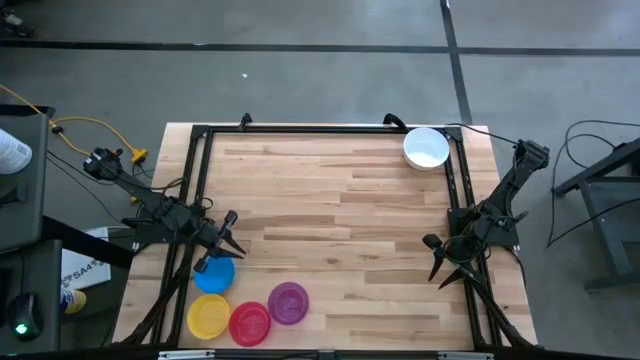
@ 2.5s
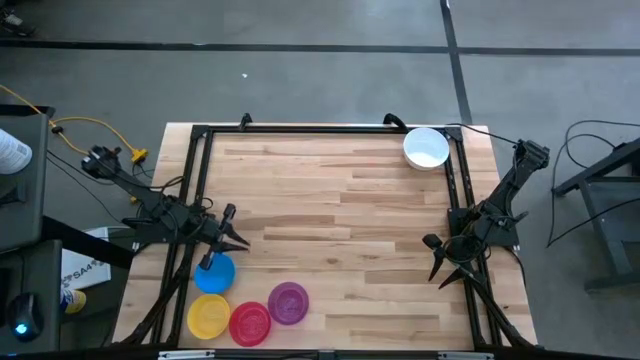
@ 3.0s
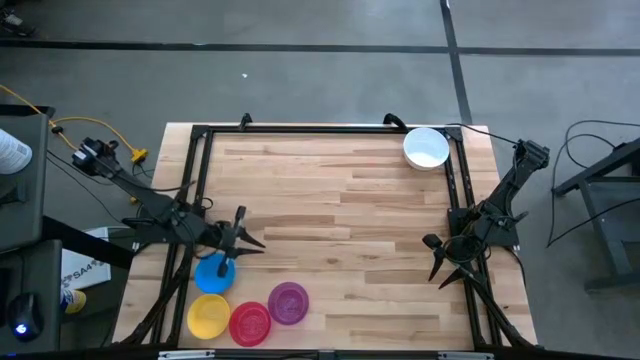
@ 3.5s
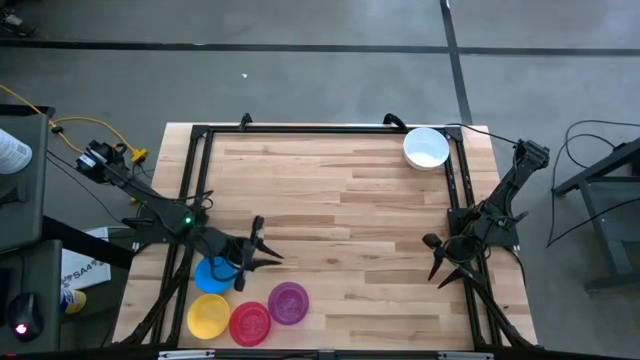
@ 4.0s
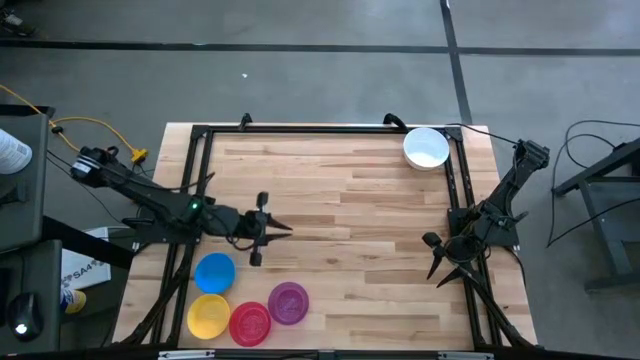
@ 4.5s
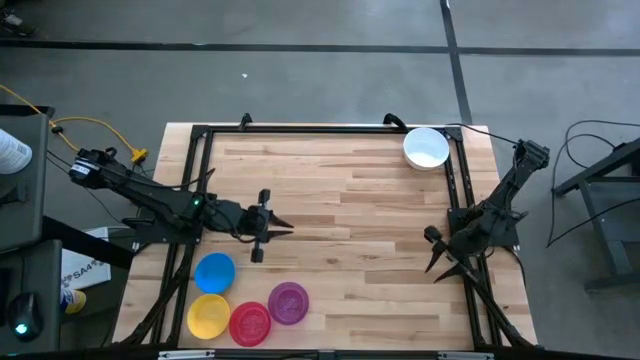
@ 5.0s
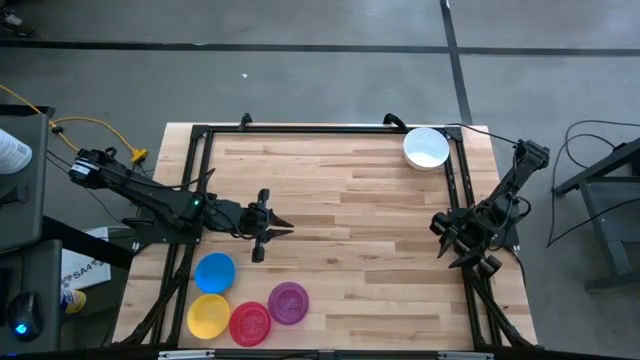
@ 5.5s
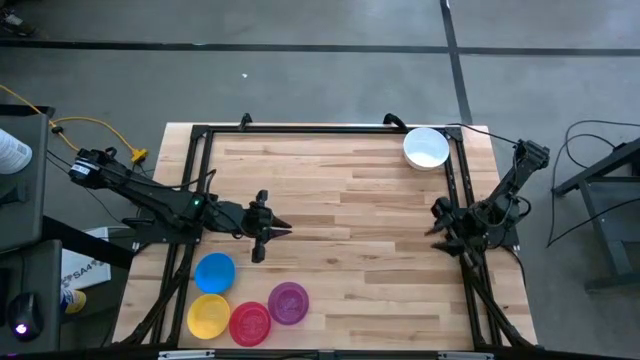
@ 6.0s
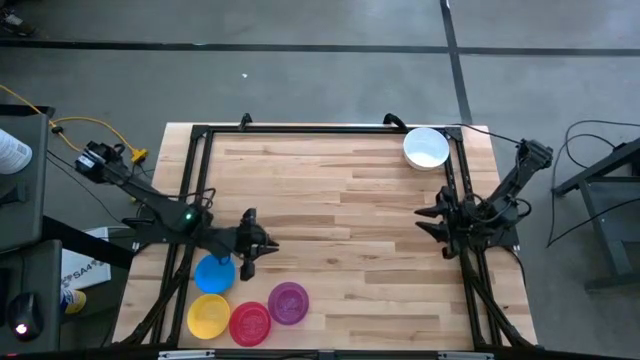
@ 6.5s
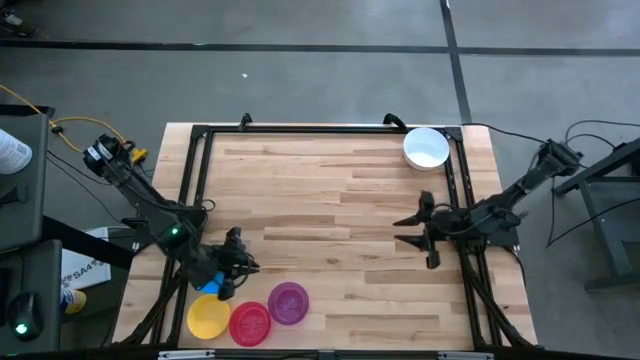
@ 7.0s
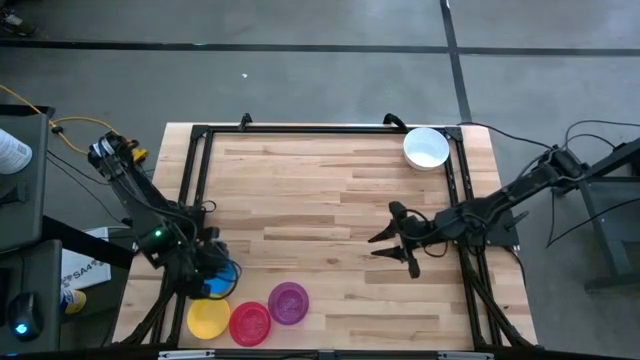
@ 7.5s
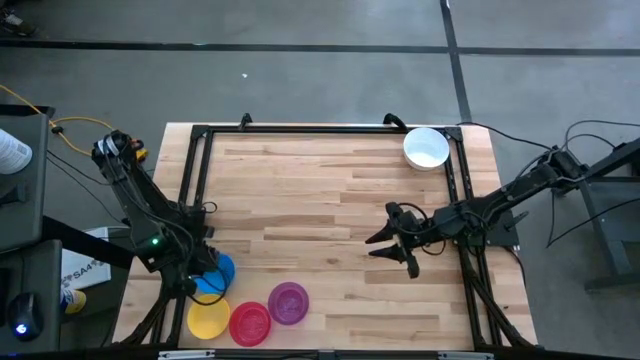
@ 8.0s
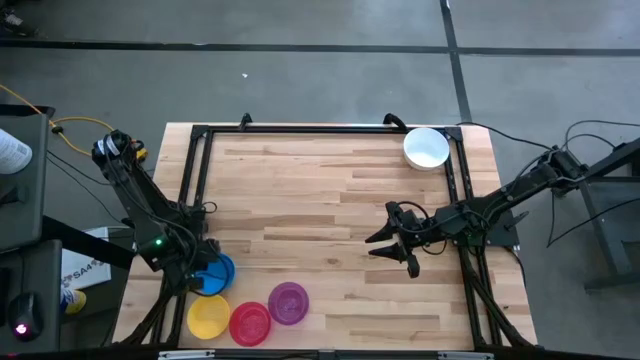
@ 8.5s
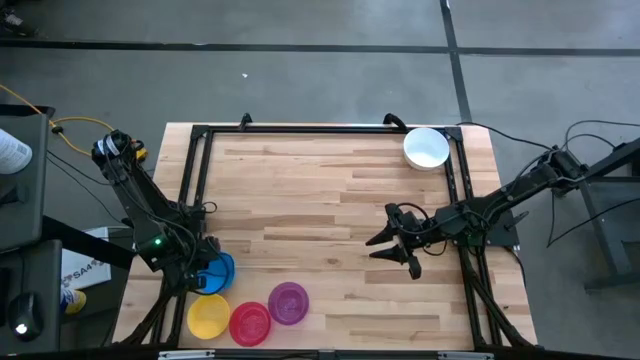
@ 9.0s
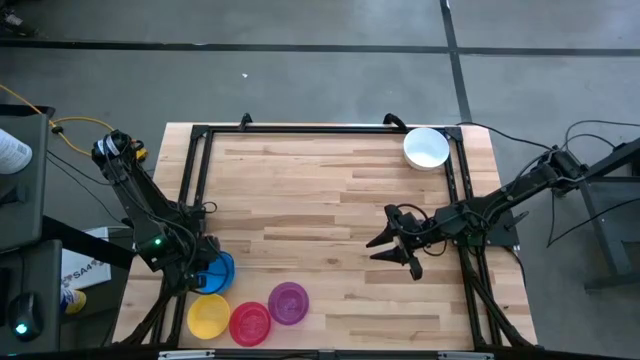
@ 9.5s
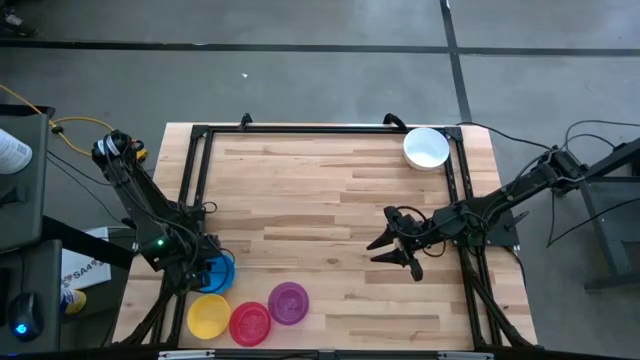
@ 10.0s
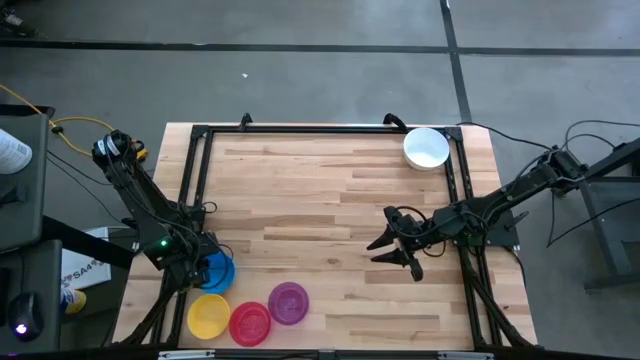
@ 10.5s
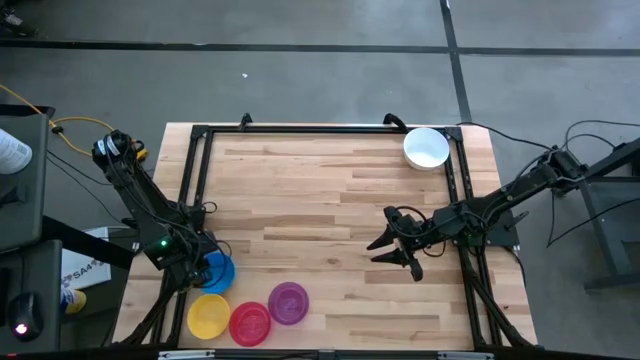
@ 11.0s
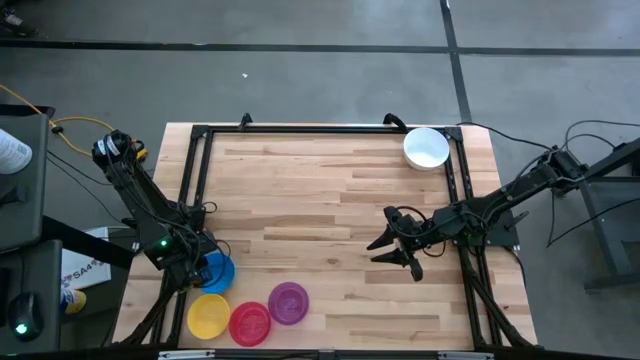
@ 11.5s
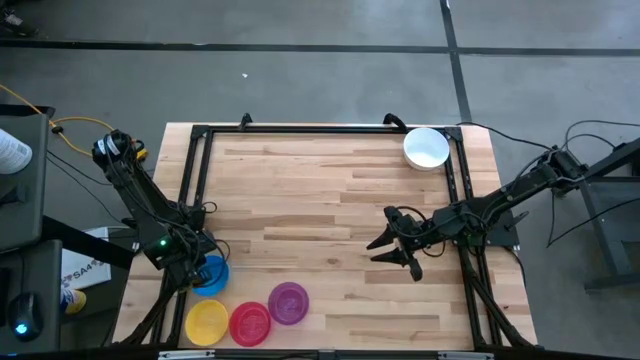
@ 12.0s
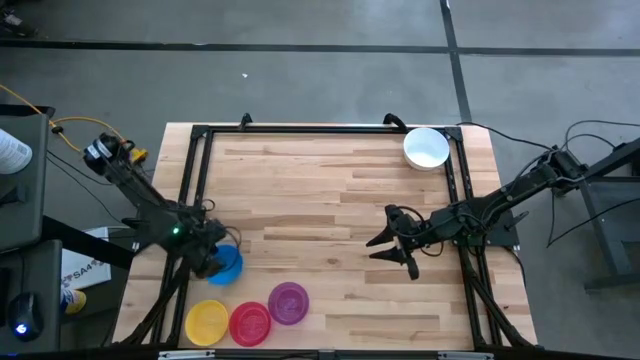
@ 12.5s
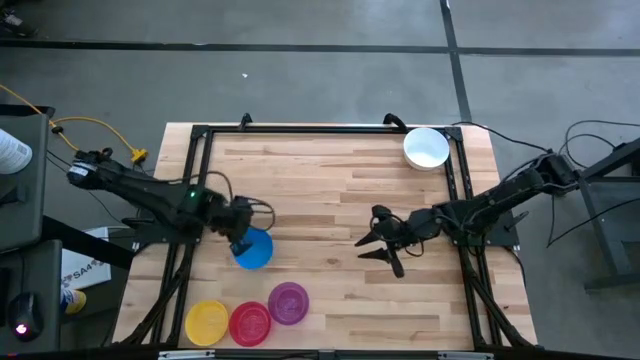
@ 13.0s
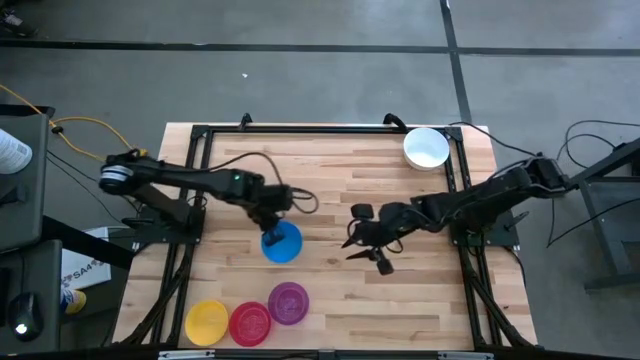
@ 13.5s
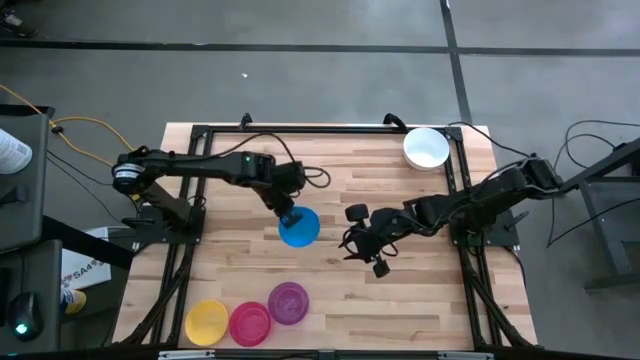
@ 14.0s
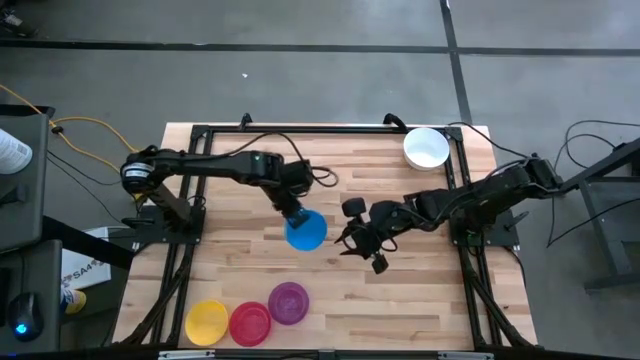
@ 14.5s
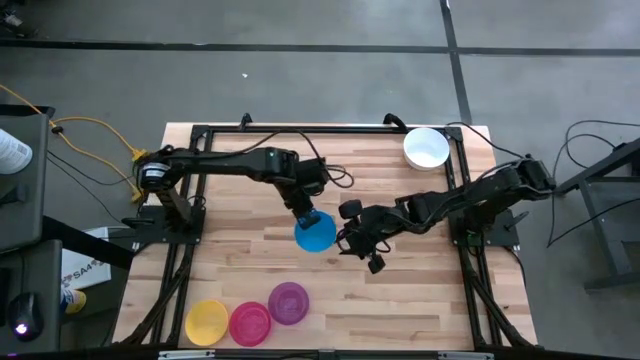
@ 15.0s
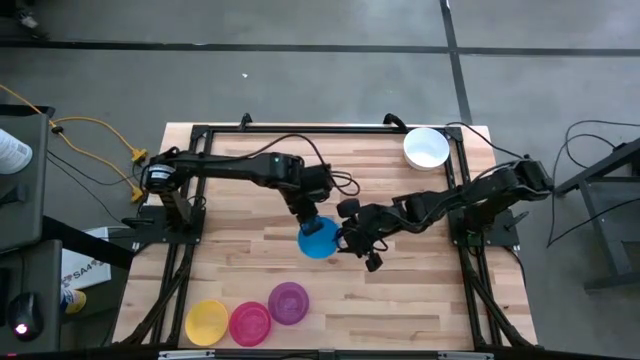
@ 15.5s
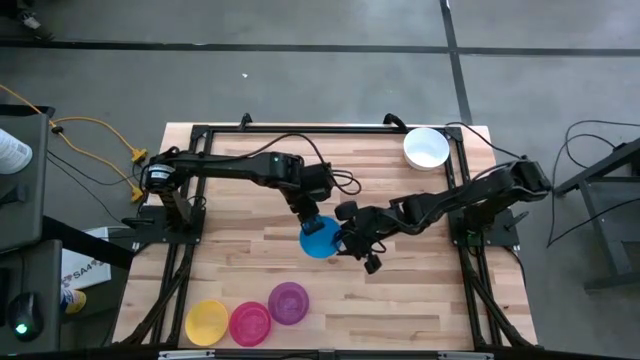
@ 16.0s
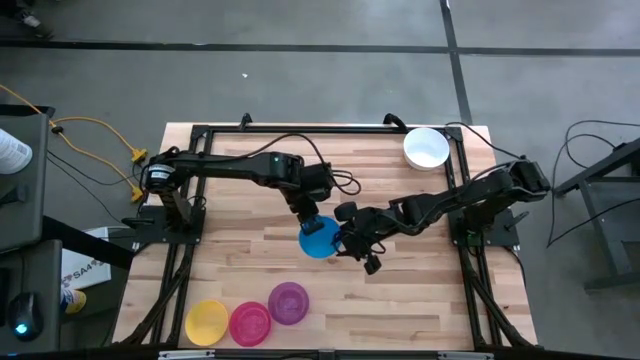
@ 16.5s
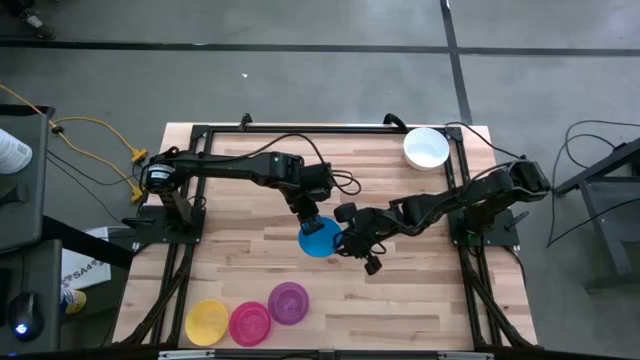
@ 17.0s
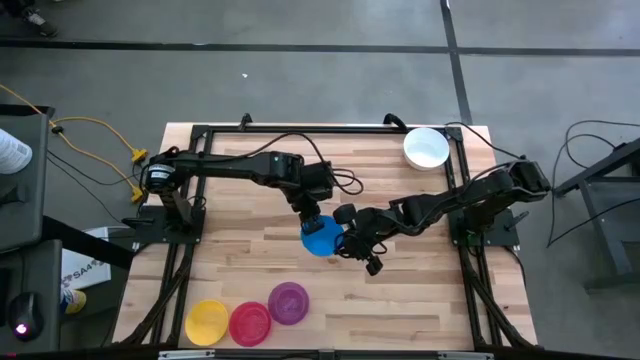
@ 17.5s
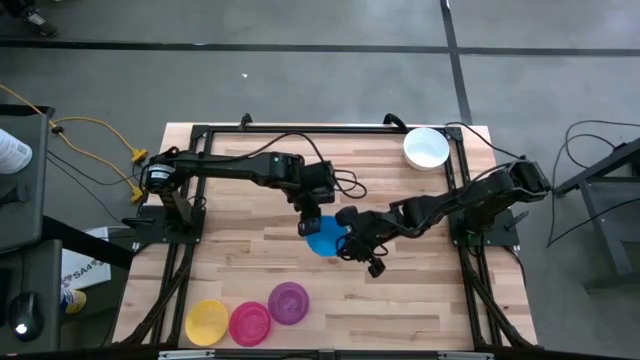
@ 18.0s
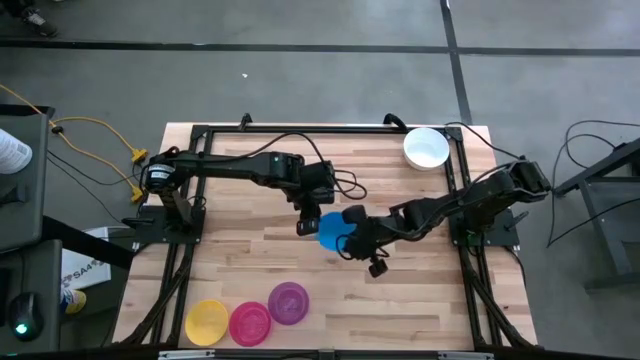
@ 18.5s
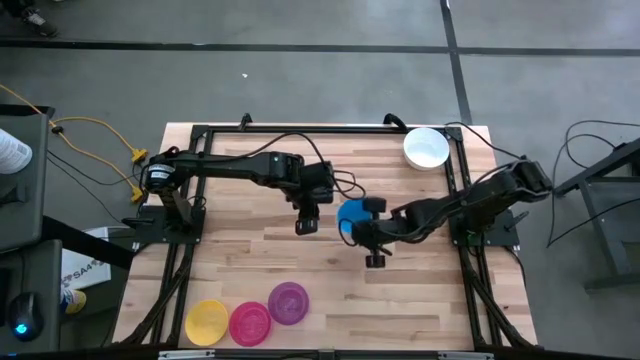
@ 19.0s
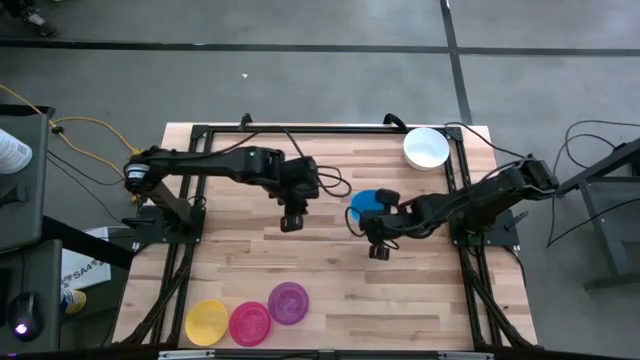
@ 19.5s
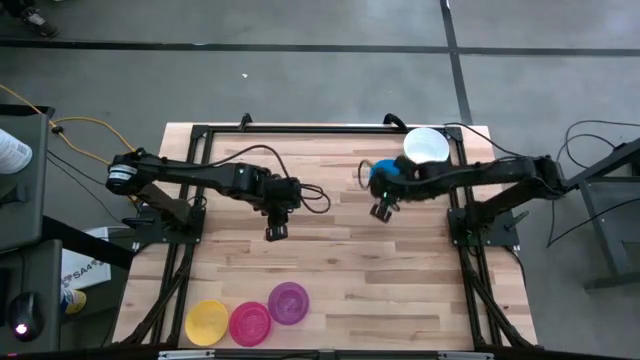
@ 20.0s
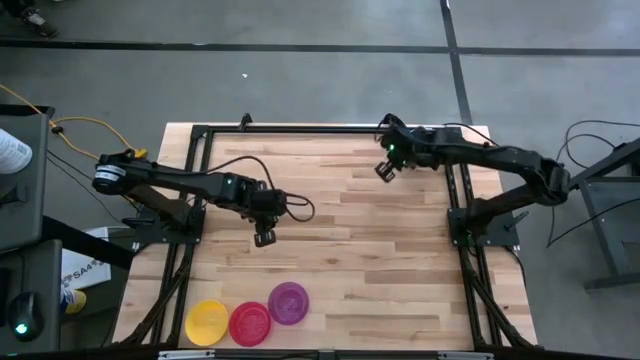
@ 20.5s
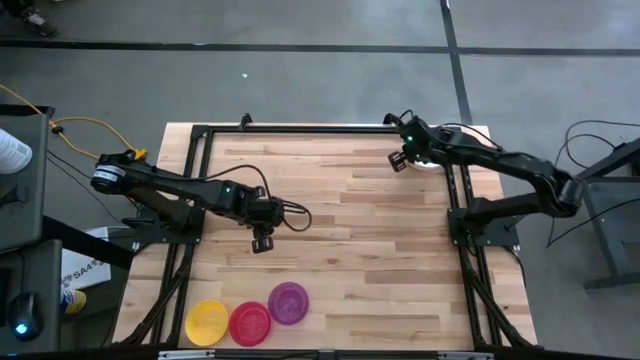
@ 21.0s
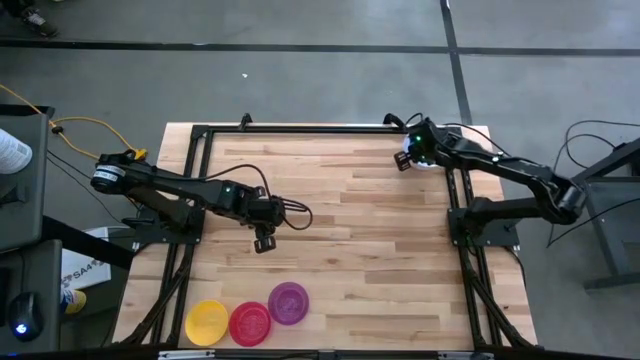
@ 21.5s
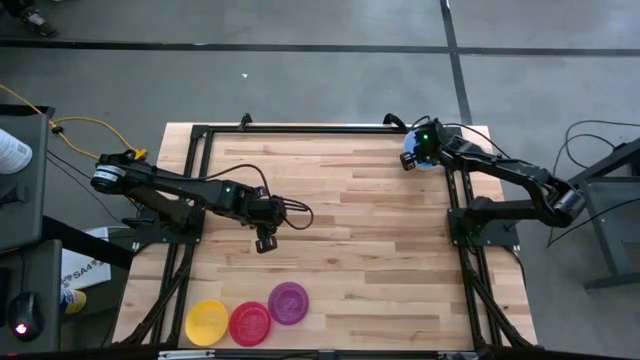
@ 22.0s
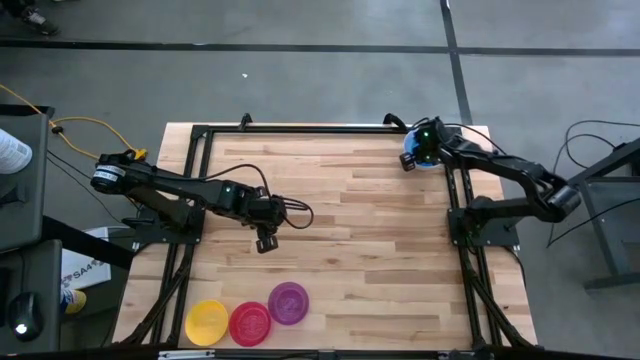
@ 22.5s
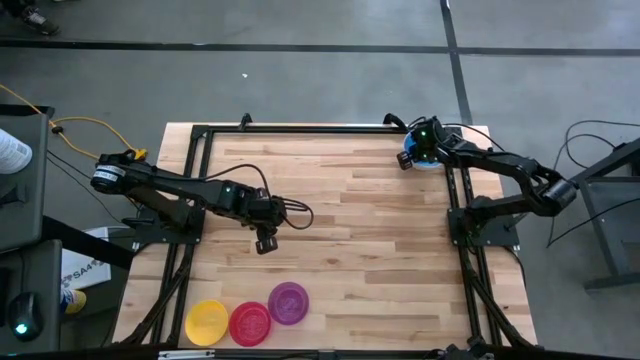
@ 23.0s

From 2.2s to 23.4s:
Stack the blue bowl on the white bowl
